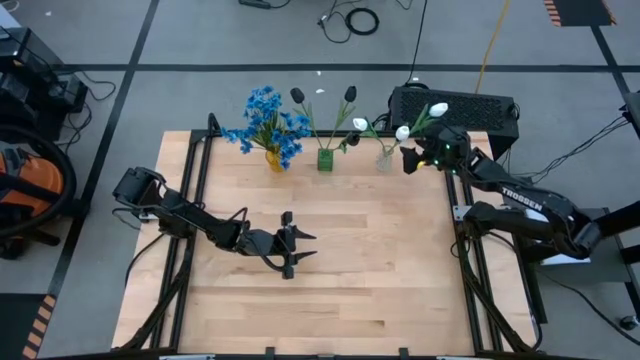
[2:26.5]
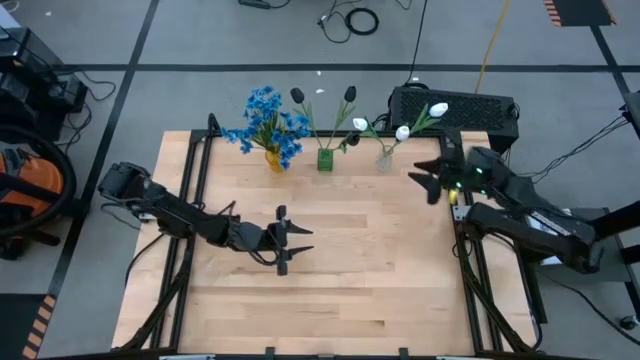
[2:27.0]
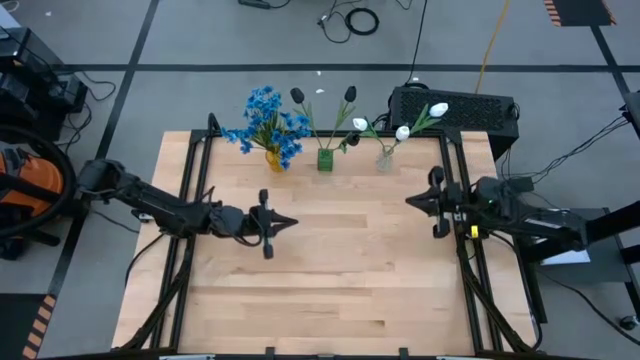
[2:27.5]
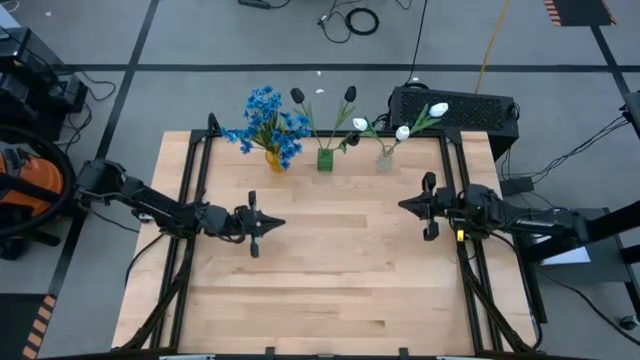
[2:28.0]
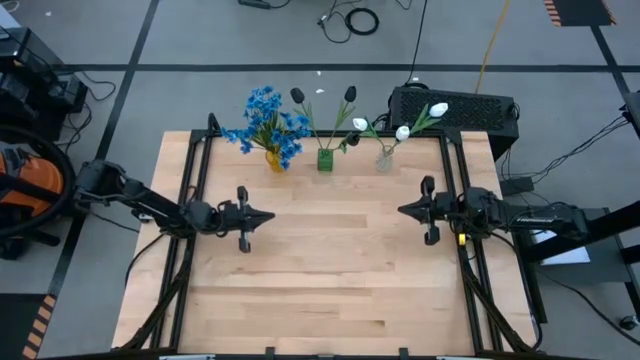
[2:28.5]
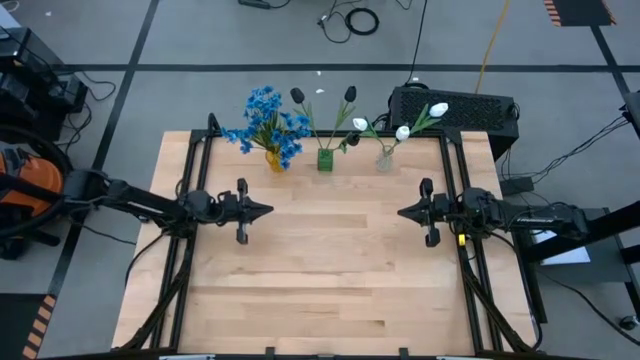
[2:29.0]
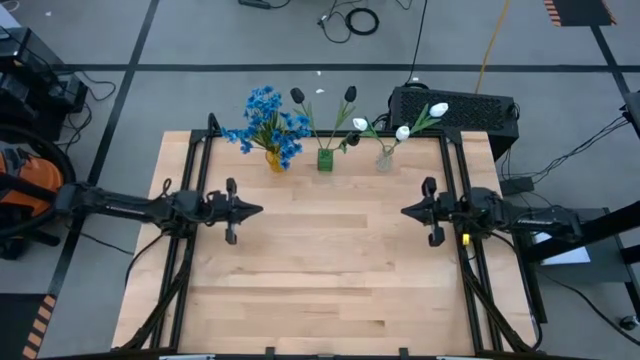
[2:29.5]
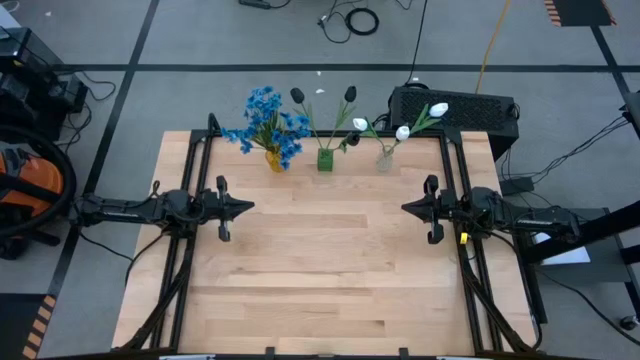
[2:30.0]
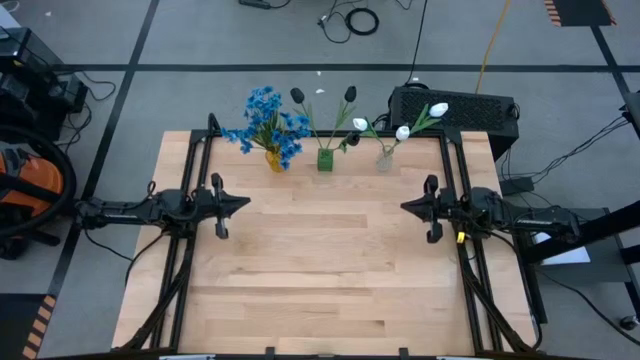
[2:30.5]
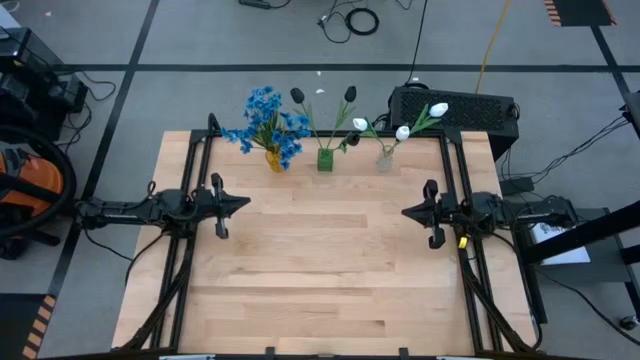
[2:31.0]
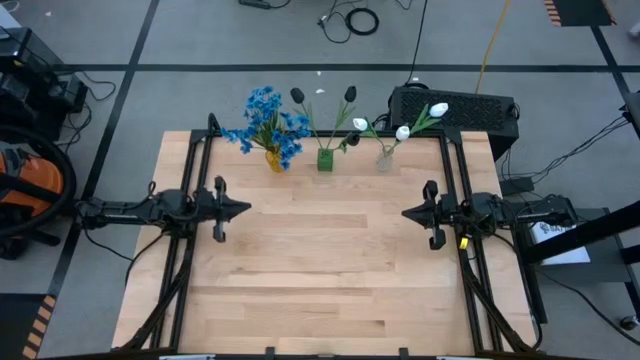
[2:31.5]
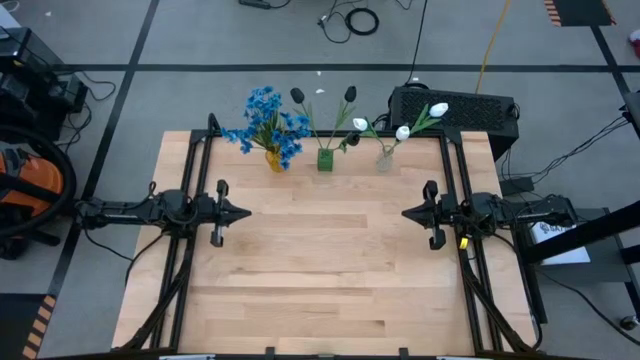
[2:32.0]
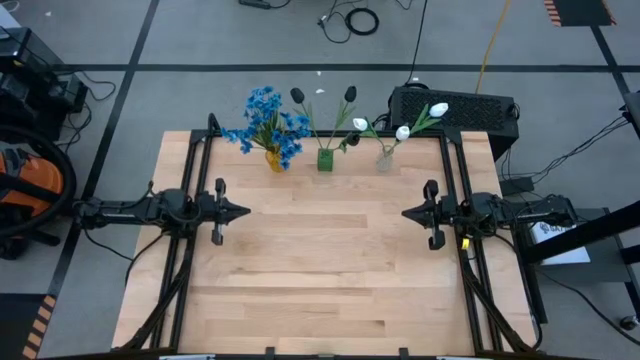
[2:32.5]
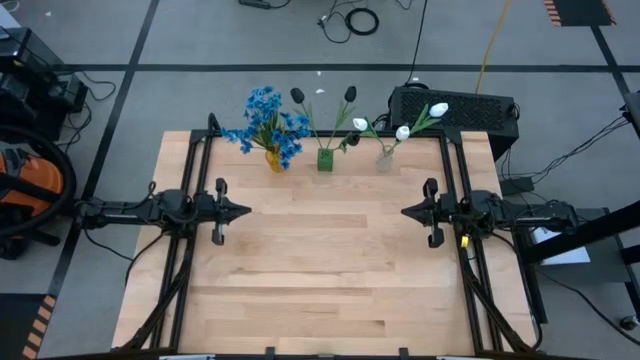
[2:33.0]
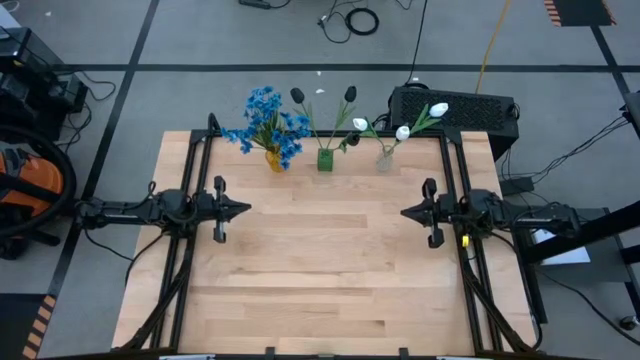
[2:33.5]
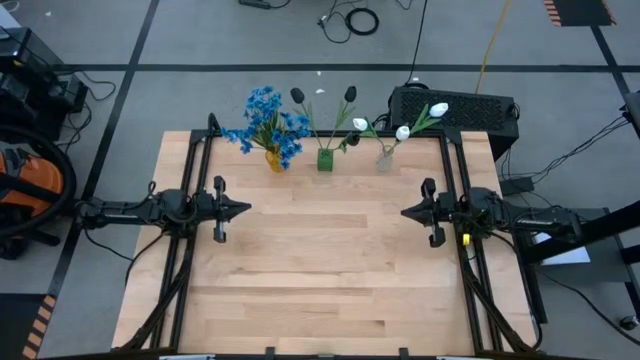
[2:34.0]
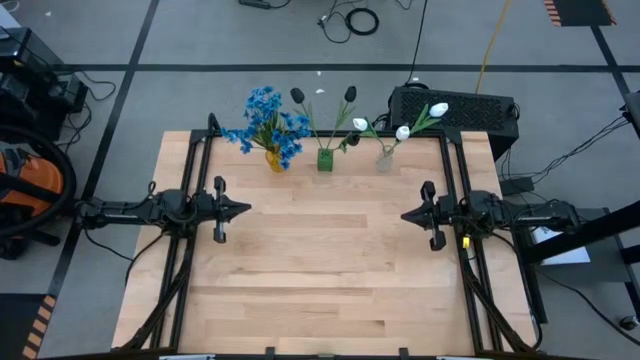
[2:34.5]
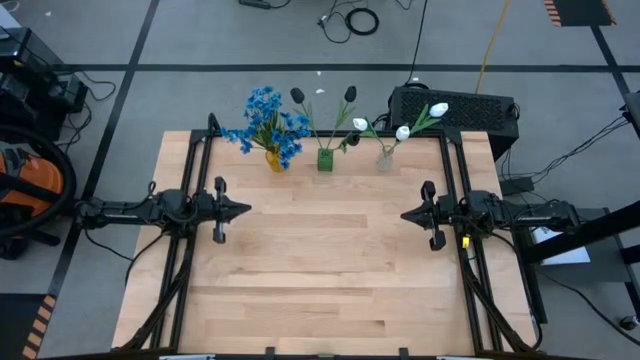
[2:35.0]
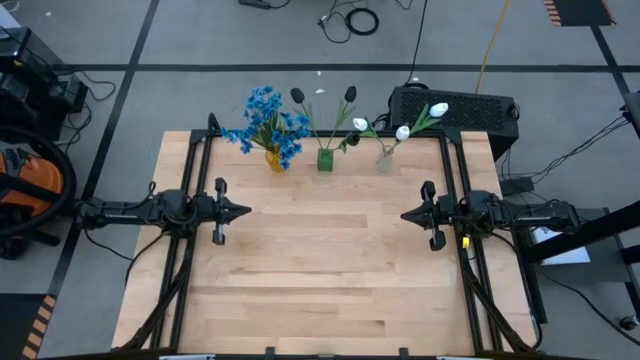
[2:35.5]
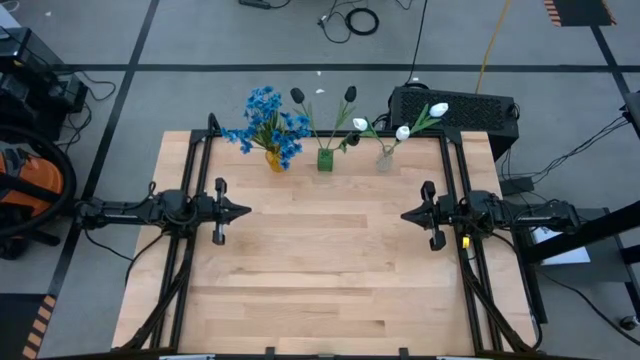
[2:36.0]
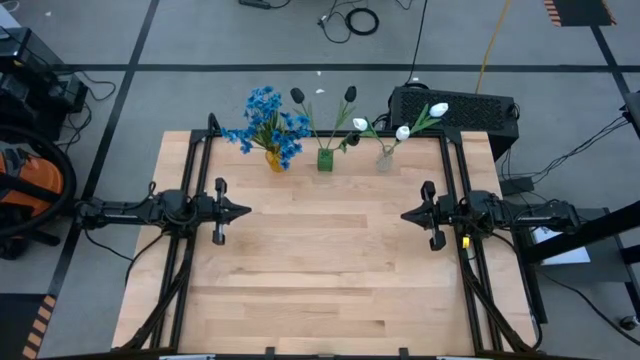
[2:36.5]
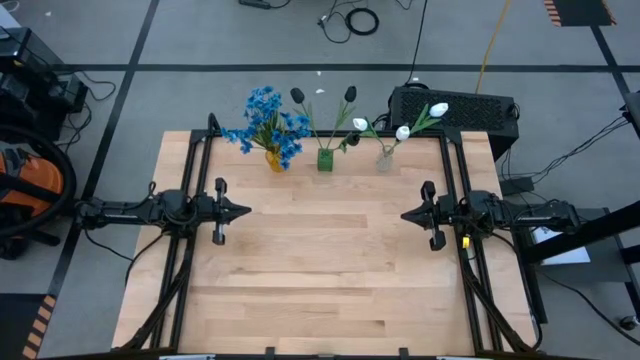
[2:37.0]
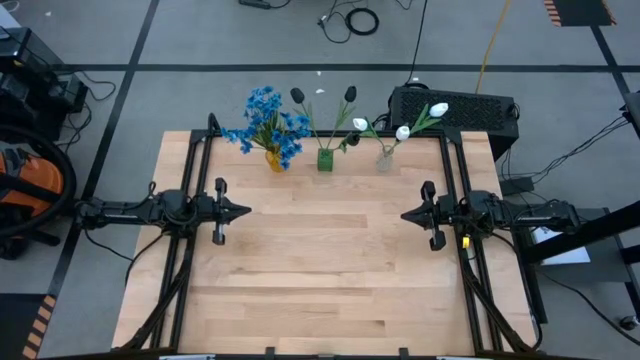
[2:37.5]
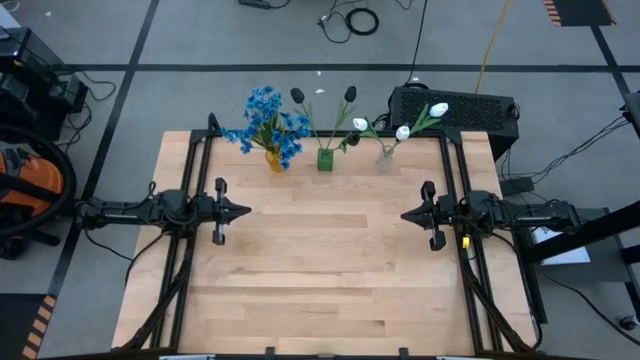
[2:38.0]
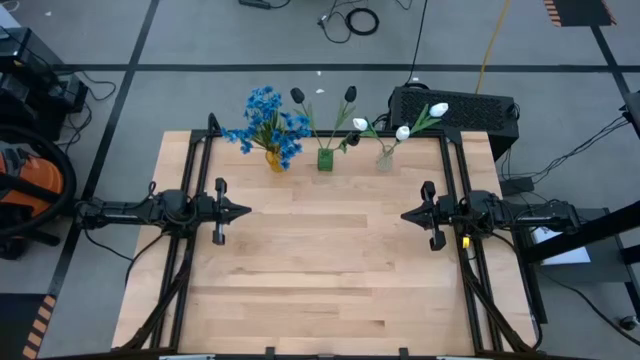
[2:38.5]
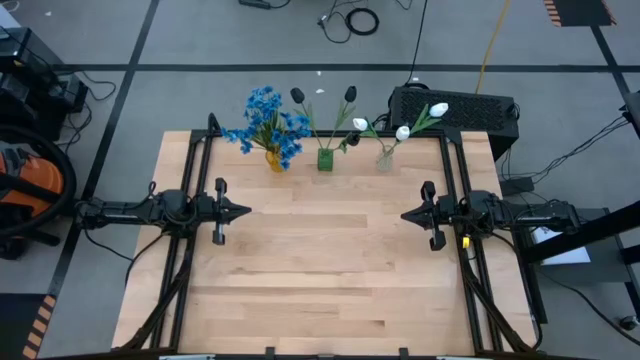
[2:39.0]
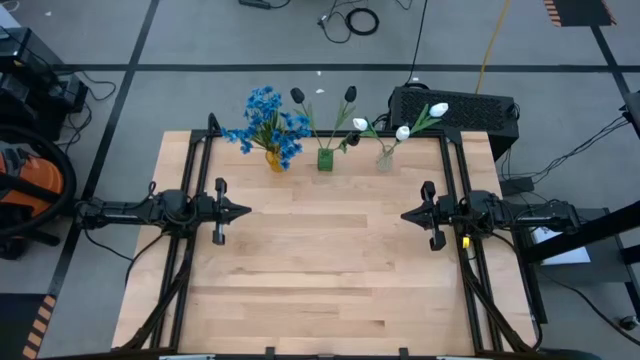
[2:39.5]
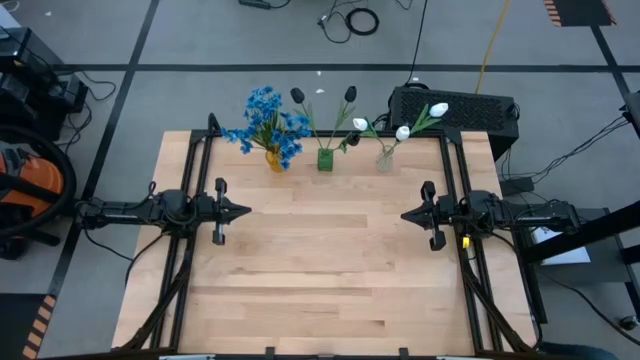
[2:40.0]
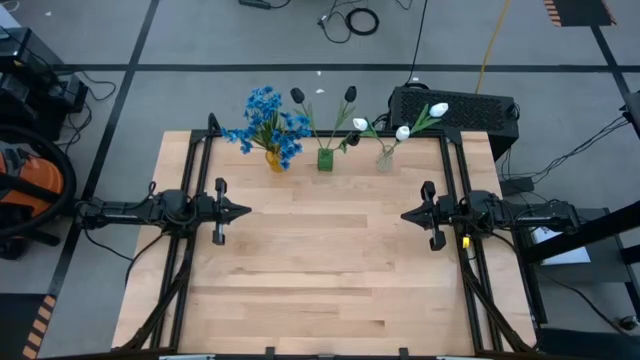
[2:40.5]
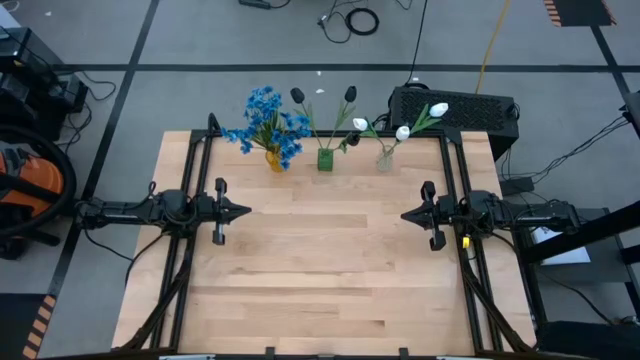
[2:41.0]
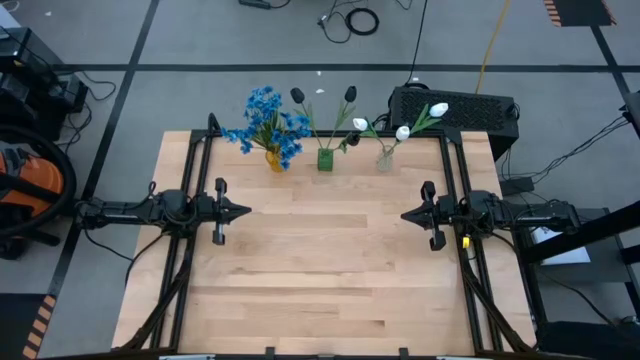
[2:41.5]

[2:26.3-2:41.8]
Task: Sort flowers into vase by color
Return to Home Position
